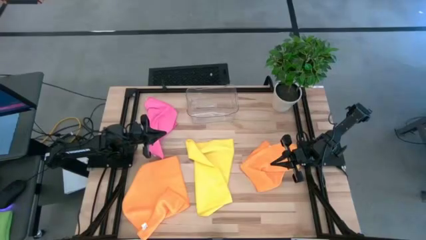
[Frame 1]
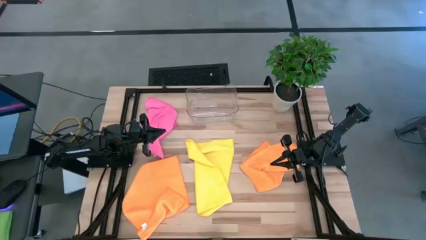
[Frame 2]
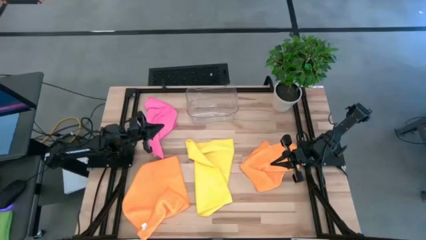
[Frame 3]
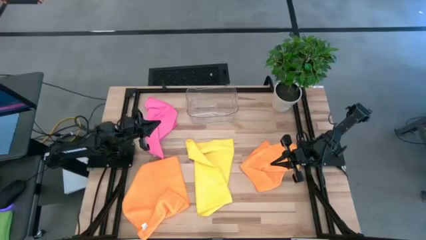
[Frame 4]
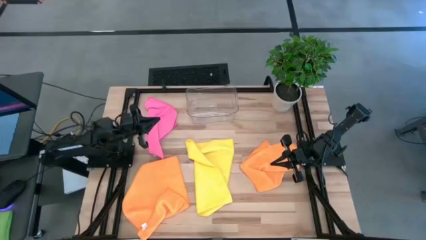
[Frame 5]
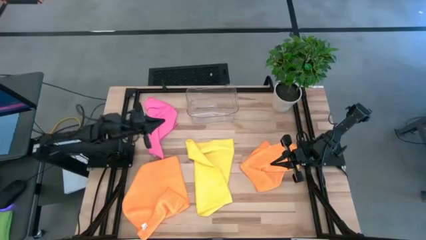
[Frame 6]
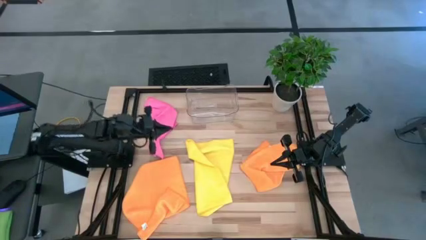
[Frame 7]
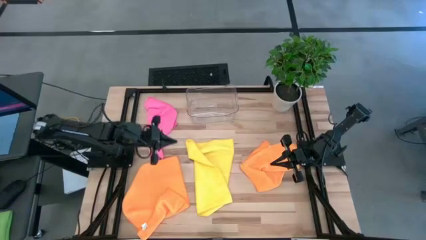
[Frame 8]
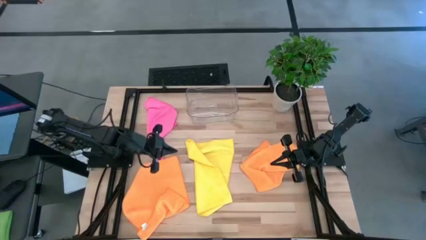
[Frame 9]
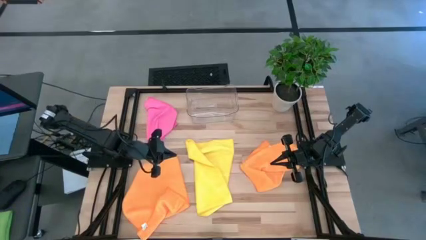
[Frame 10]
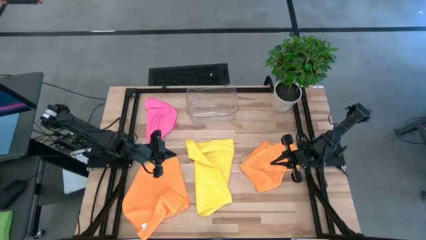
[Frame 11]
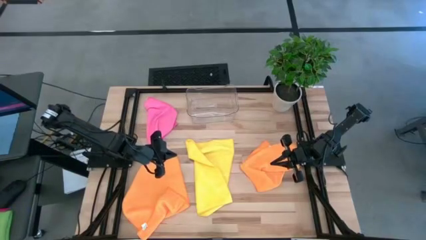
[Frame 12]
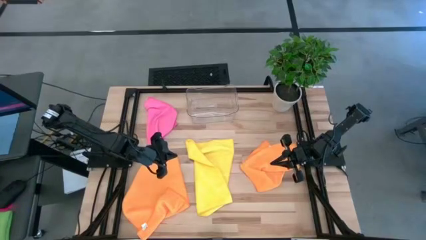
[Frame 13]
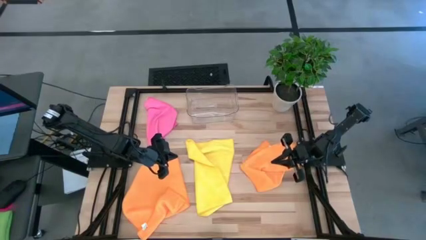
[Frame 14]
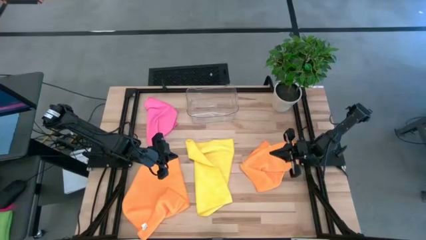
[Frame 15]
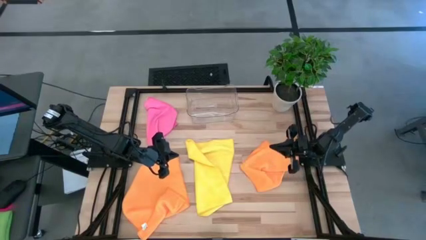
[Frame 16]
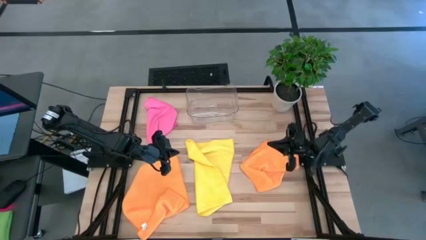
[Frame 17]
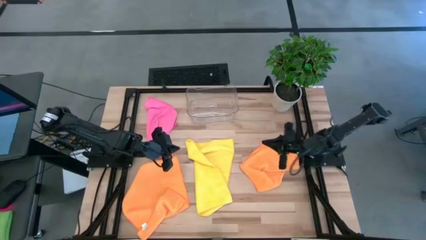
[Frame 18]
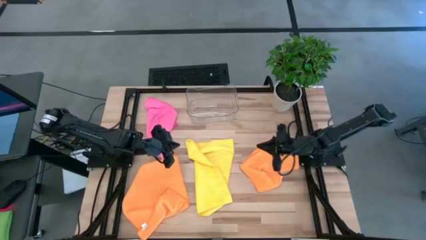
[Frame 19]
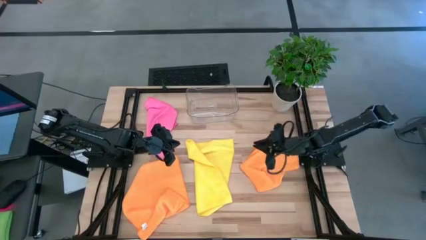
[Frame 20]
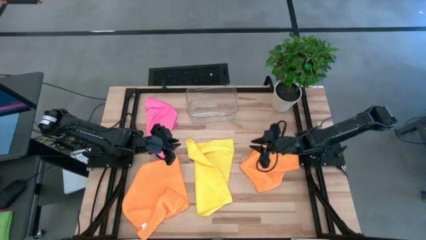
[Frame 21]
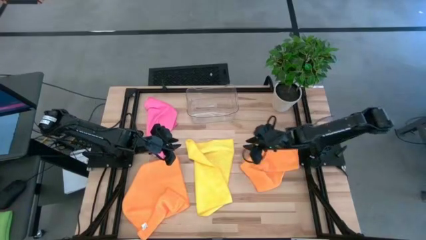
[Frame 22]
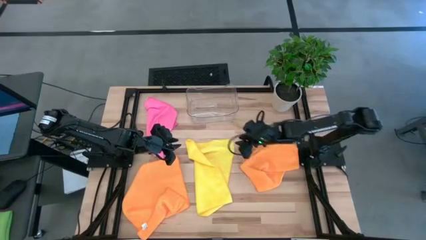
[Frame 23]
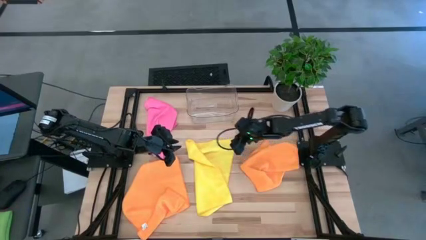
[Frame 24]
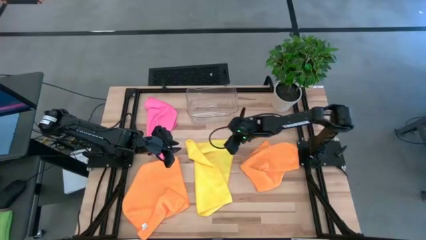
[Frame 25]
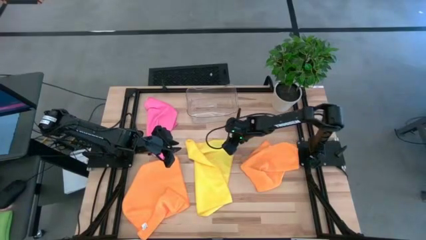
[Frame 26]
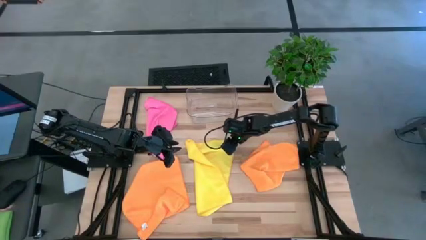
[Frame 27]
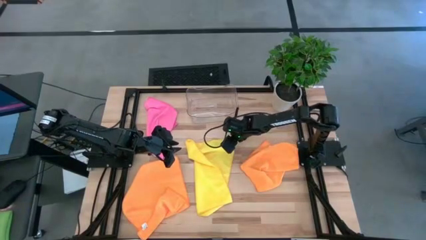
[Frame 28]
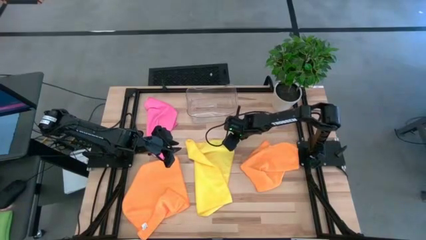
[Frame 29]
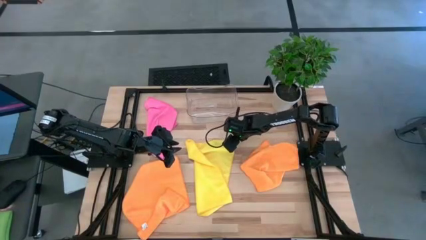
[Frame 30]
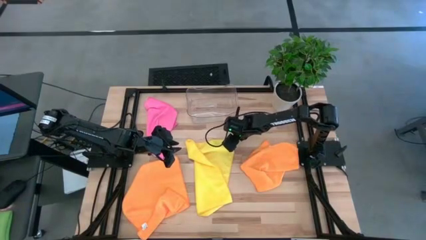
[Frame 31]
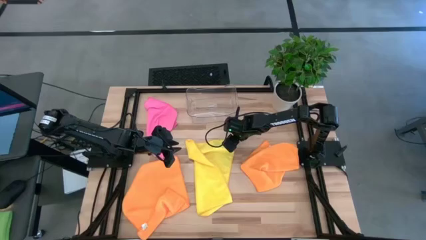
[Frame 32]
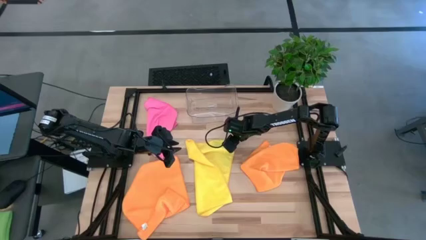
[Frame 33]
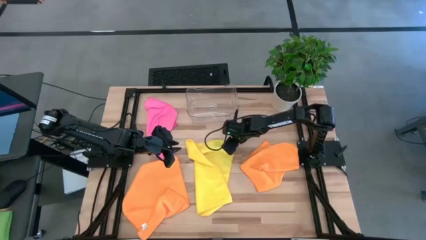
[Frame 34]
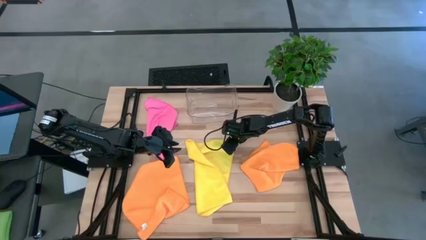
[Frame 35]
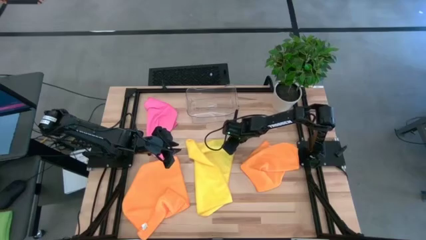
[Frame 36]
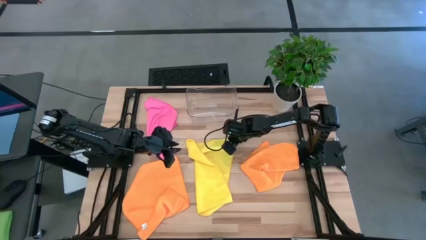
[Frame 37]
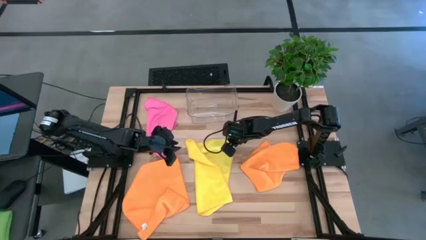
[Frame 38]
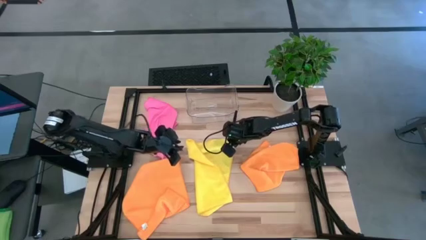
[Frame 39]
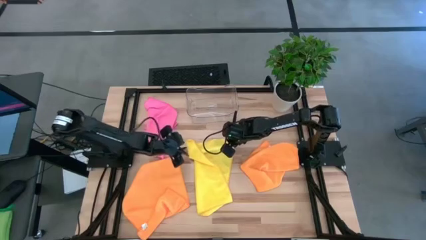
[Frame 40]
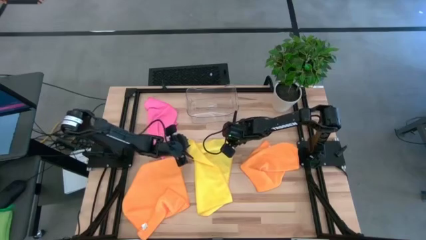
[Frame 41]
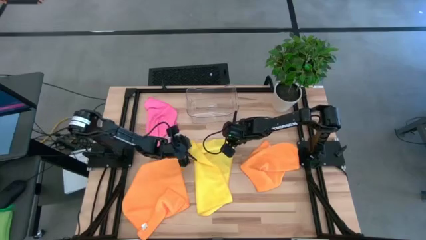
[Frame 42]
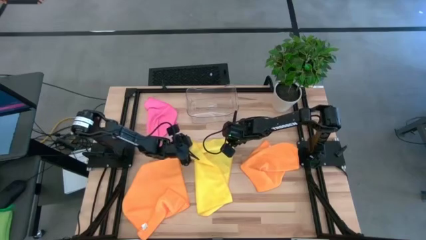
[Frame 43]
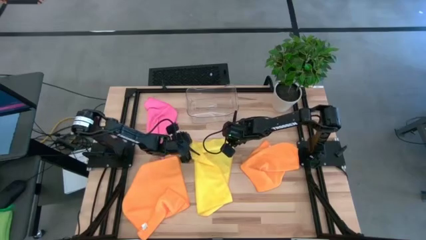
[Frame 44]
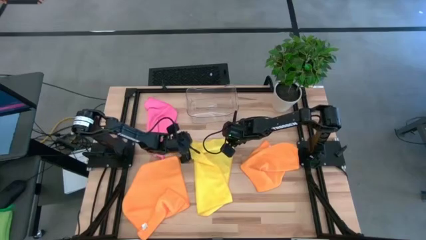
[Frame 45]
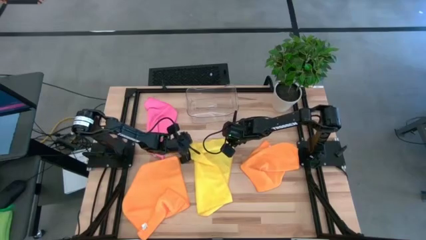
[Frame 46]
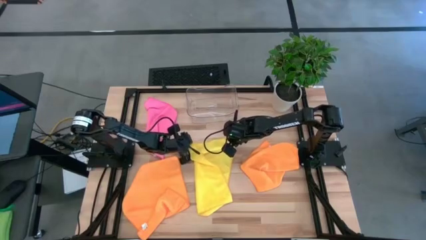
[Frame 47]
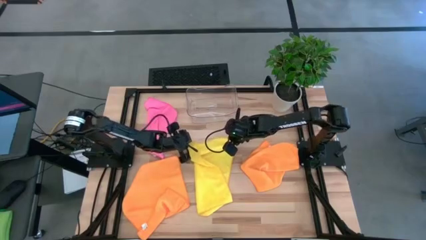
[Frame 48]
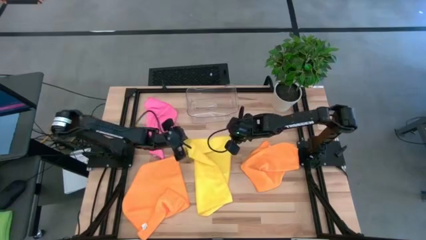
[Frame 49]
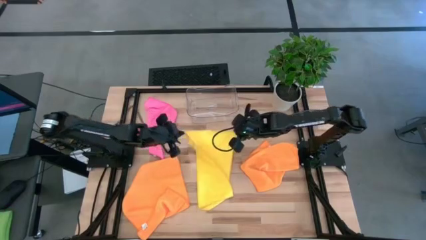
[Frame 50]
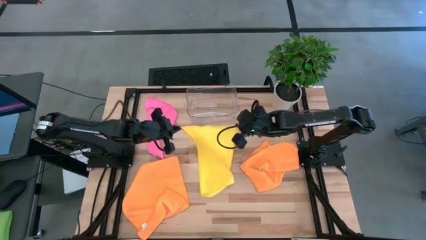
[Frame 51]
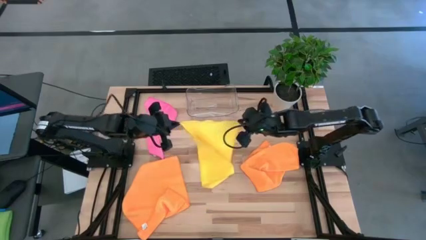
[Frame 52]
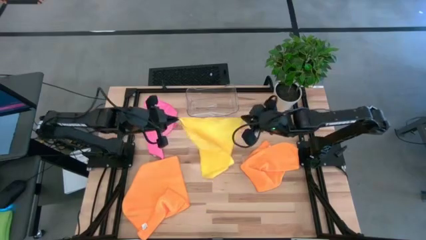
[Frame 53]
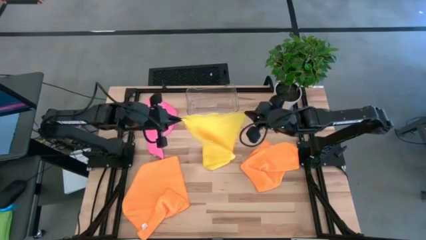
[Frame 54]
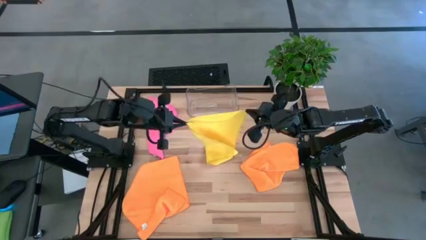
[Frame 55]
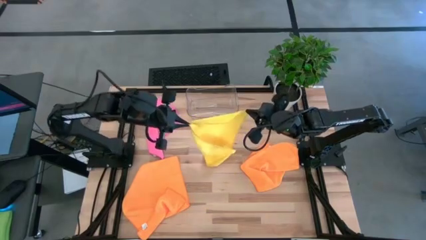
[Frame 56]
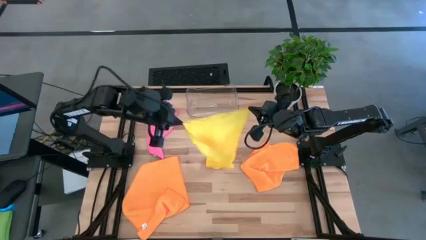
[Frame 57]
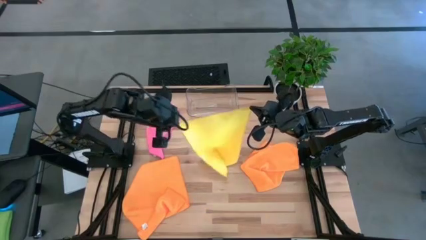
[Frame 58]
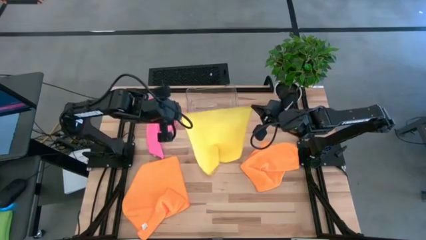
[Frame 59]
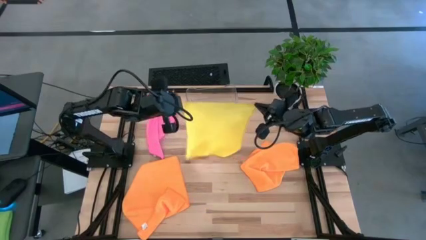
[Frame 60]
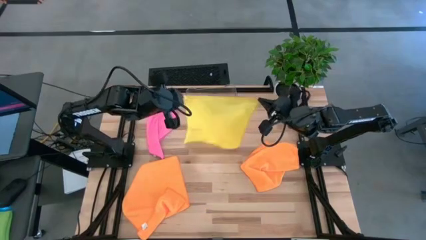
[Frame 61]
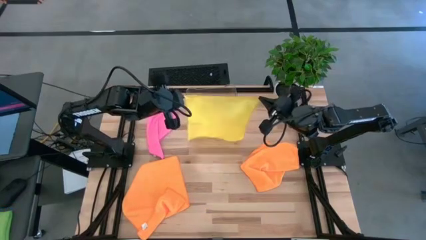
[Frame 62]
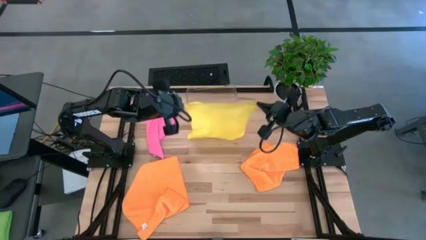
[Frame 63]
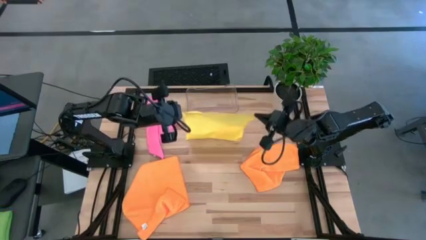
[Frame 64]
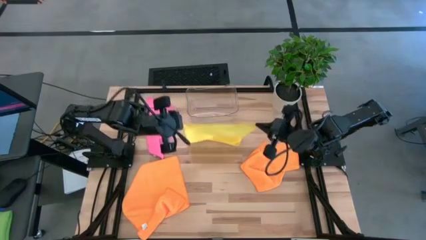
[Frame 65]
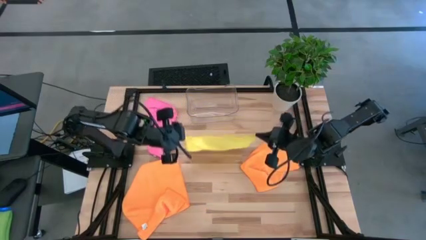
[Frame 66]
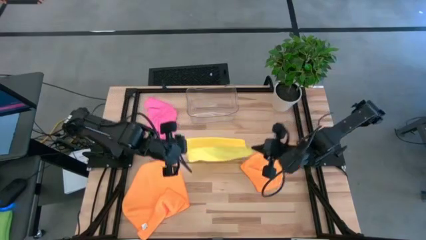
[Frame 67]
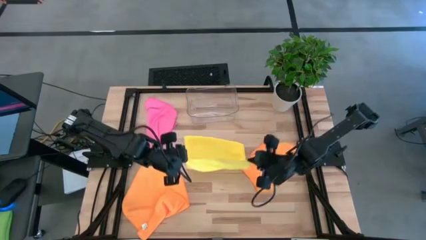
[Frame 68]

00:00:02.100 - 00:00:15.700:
Task: Fold microfiber towels
Fold the yellow towel
